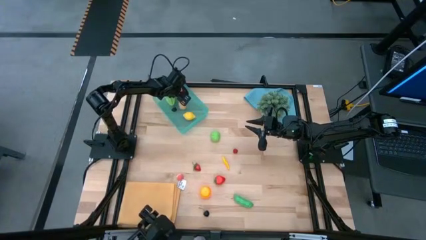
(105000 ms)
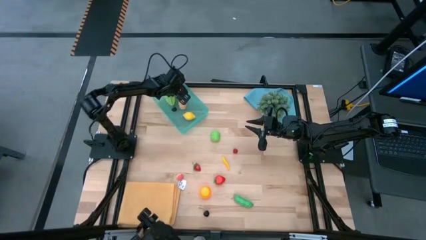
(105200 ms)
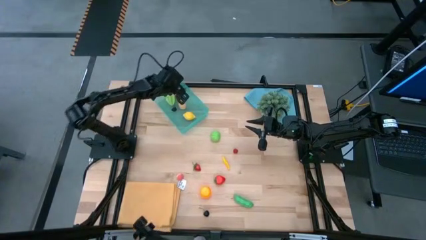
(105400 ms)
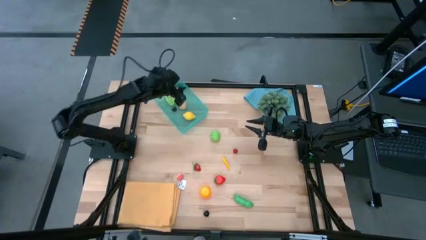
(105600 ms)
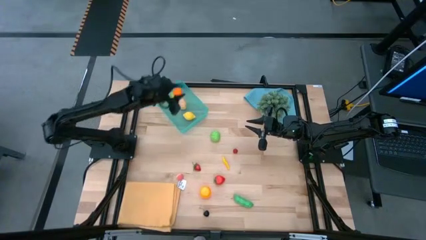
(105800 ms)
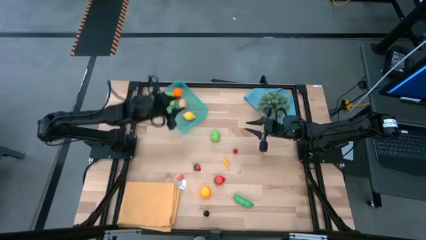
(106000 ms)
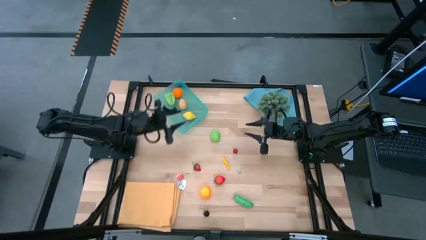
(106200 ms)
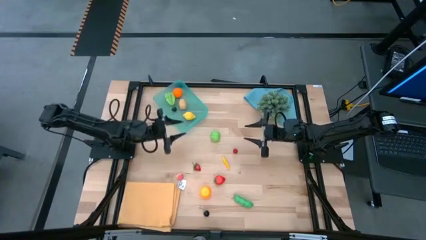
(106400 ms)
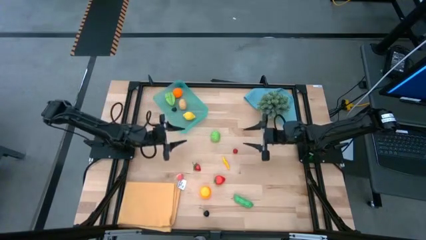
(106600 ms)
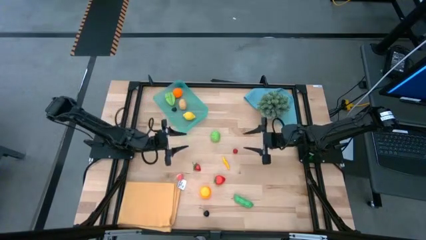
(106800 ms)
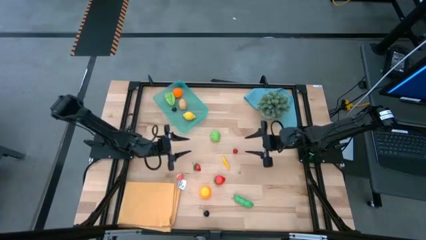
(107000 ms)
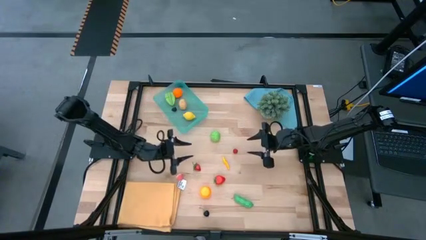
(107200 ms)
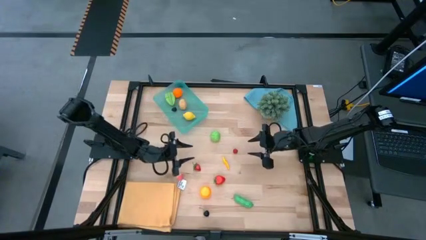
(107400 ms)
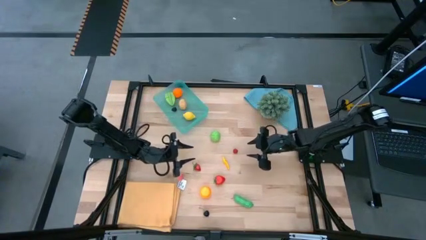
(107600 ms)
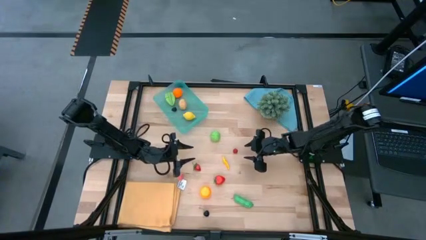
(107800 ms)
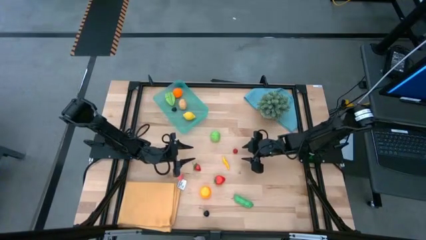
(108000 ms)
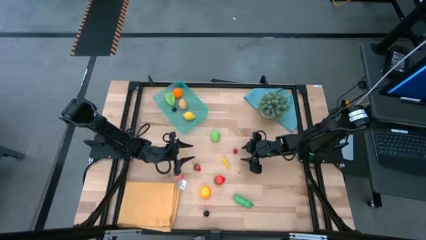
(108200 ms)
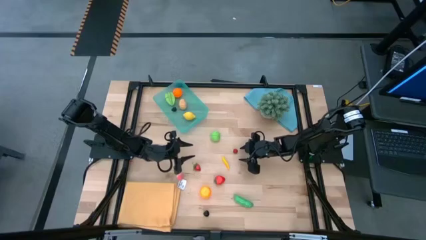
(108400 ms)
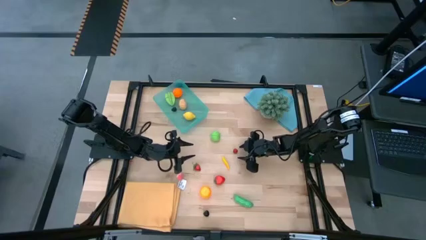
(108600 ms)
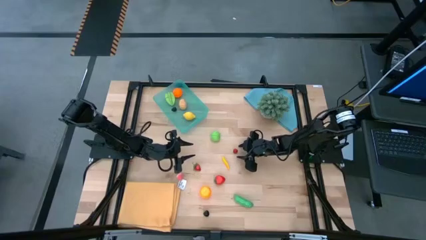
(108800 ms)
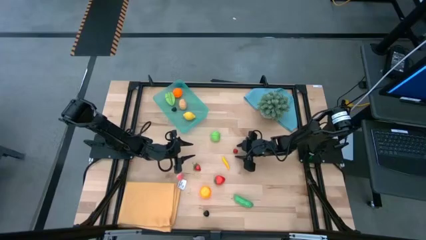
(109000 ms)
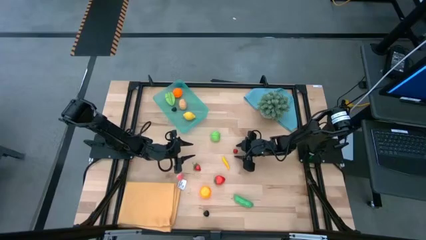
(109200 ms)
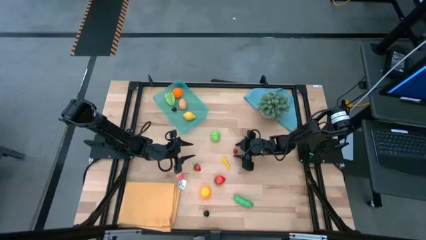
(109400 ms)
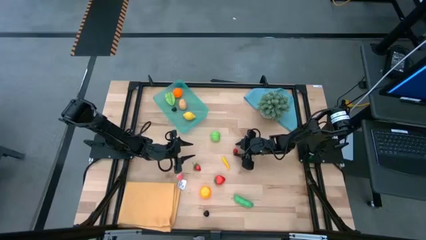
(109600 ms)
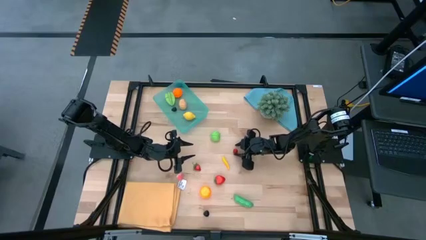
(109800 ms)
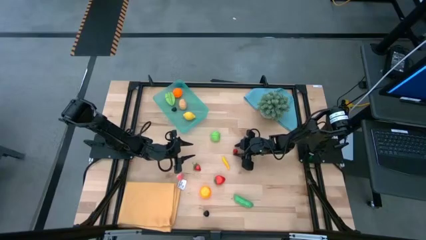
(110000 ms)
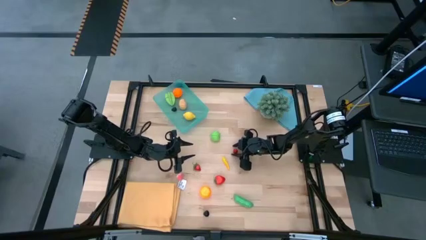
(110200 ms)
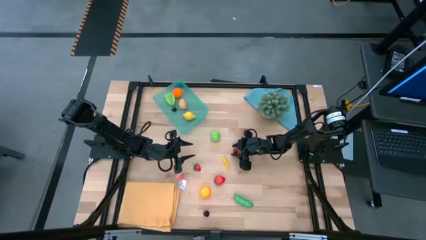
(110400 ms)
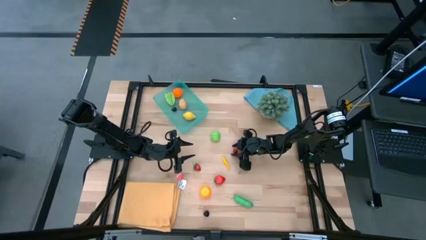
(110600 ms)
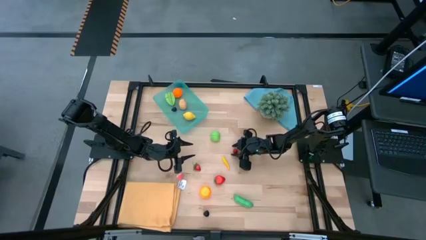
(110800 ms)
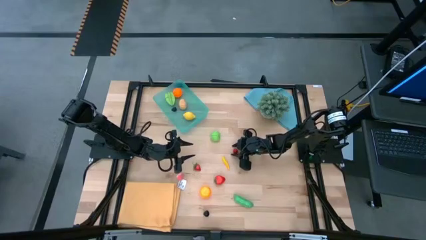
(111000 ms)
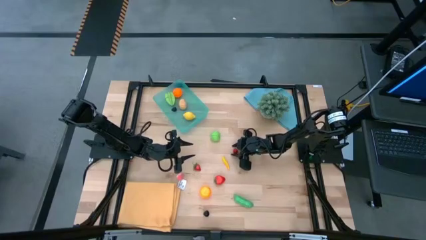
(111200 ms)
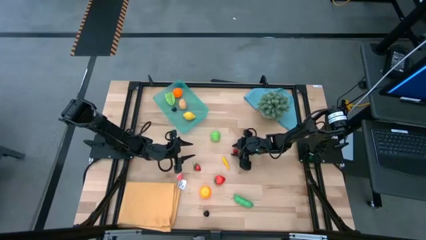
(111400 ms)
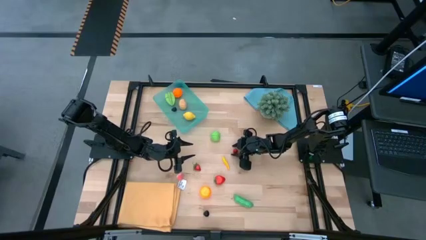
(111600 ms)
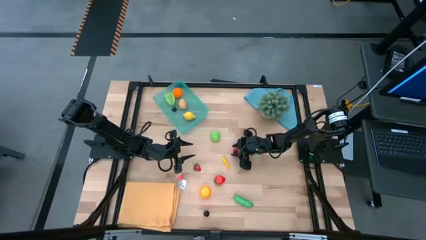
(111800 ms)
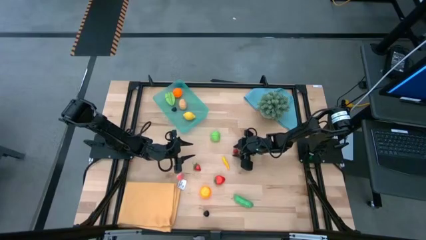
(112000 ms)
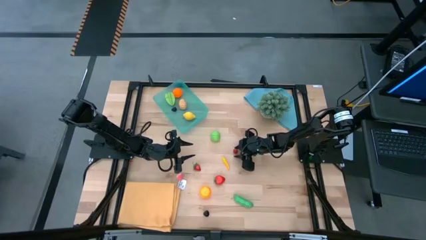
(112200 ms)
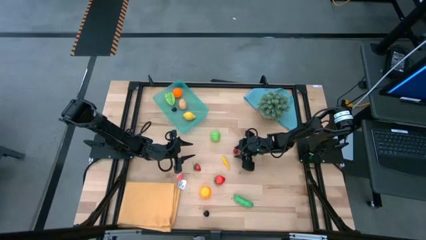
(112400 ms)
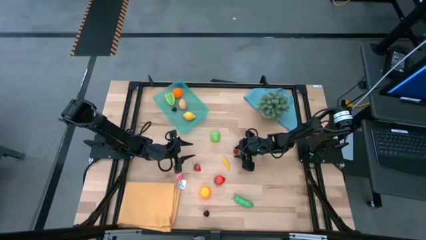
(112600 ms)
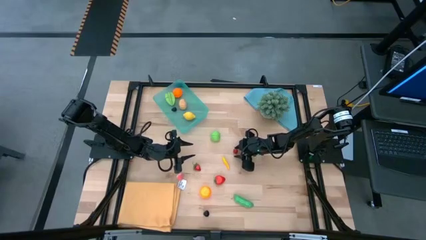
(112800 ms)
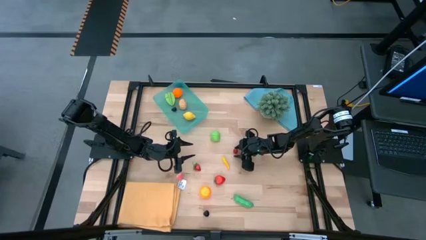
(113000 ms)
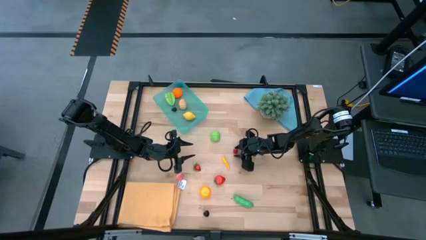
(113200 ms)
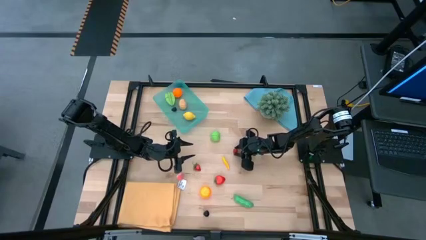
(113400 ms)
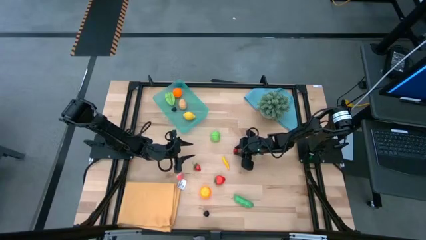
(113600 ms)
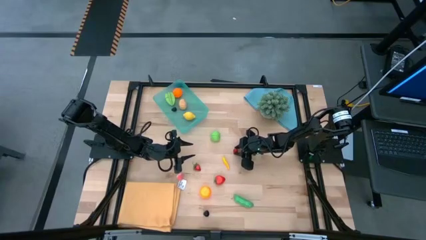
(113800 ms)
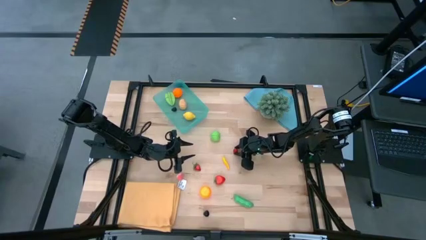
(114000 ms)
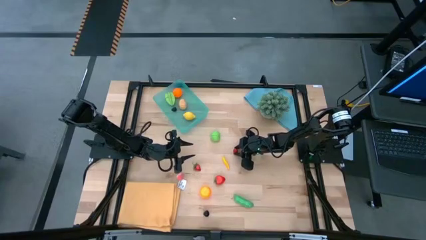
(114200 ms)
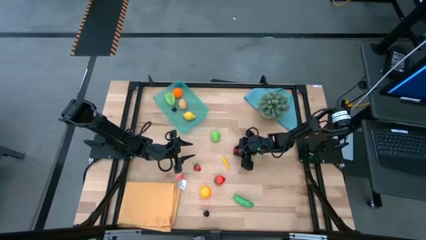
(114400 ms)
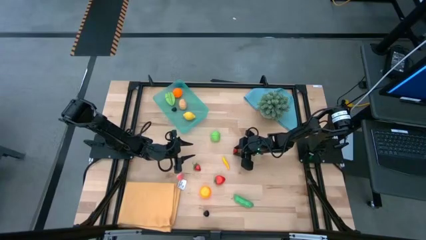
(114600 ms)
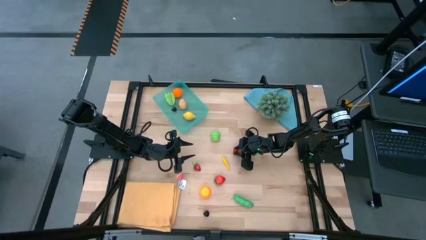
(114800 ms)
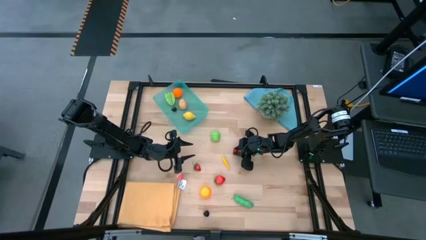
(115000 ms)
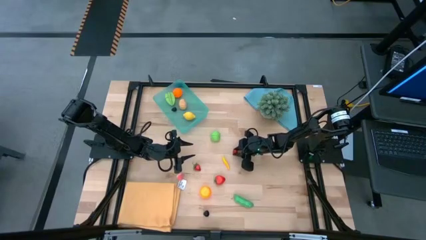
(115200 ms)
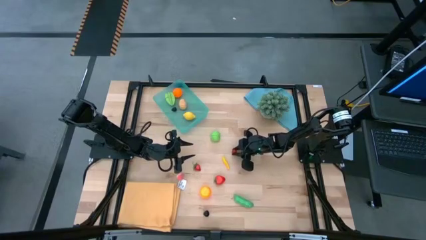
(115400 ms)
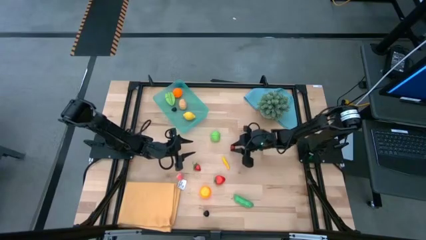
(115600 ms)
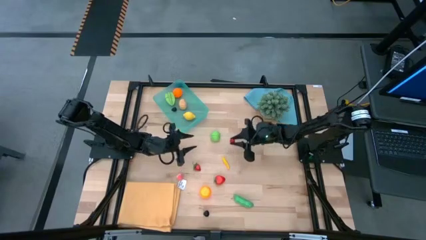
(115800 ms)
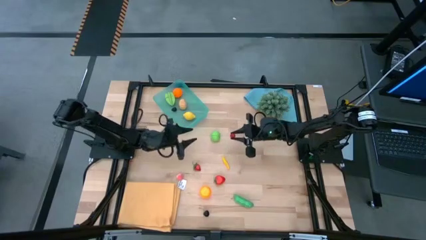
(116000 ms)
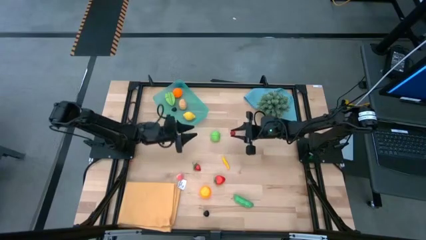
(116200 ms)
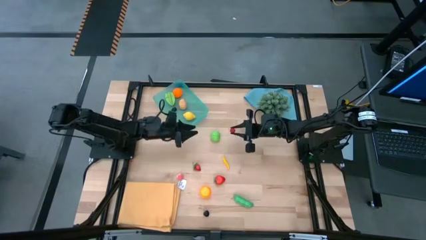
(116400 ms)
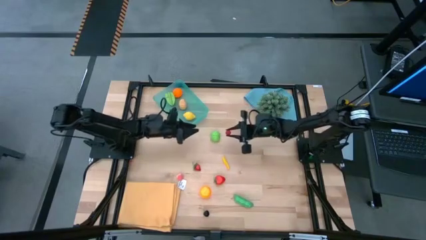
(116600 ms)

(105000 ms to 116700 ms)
Task: Pick and placing Produce into tupperware
Put the red raspberry into the blue bin

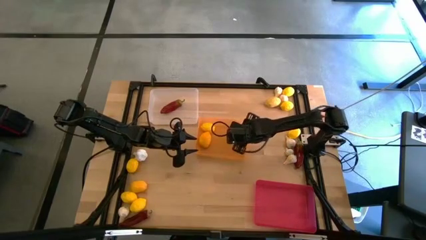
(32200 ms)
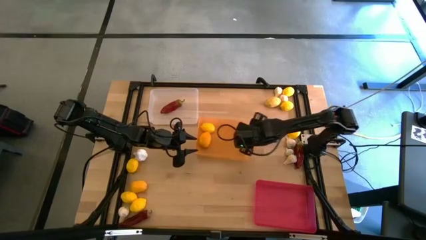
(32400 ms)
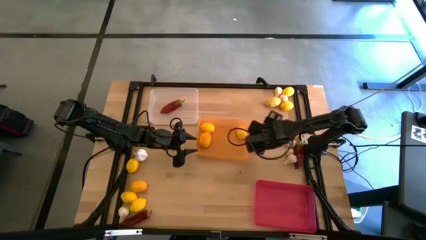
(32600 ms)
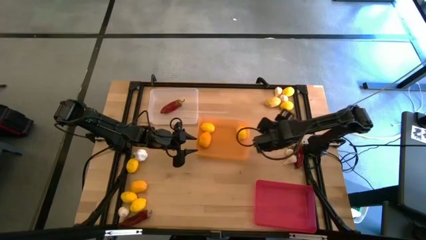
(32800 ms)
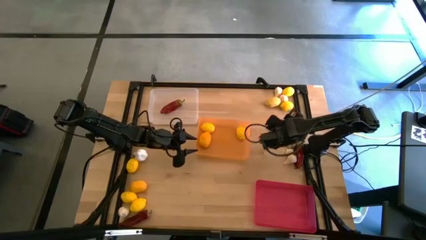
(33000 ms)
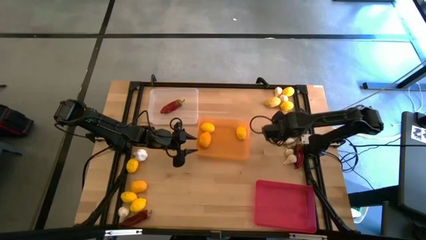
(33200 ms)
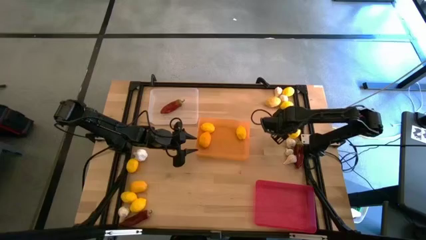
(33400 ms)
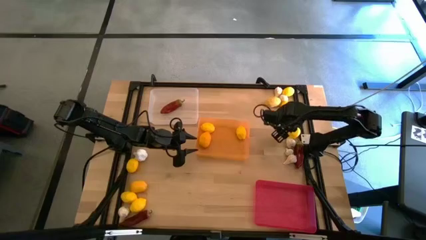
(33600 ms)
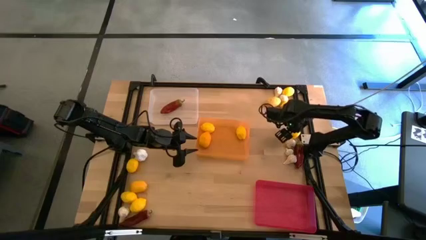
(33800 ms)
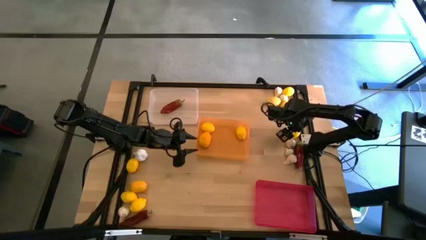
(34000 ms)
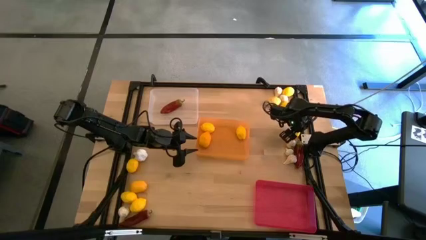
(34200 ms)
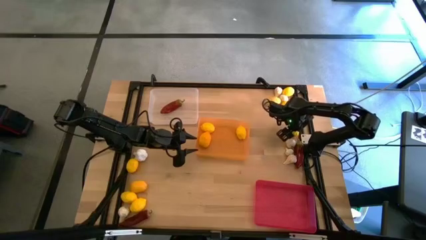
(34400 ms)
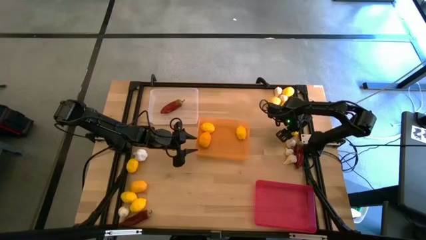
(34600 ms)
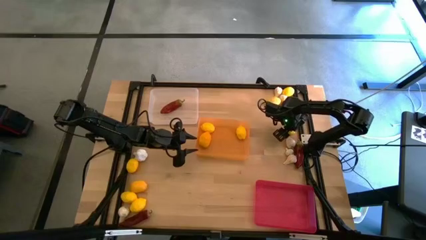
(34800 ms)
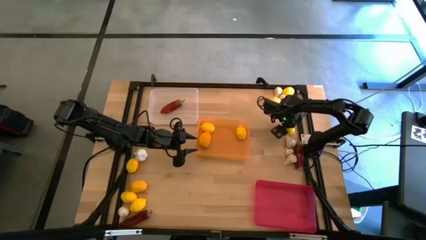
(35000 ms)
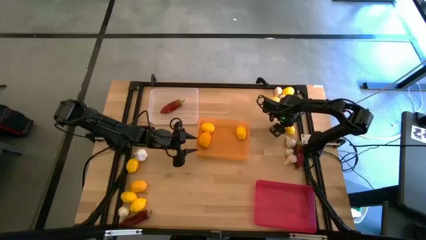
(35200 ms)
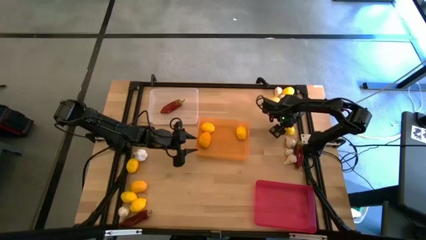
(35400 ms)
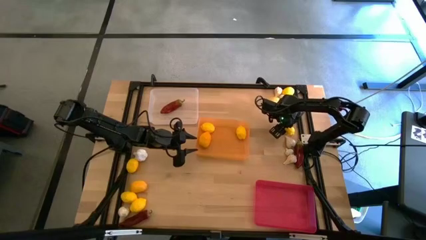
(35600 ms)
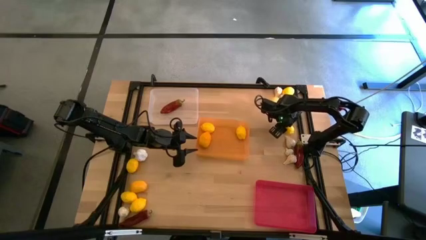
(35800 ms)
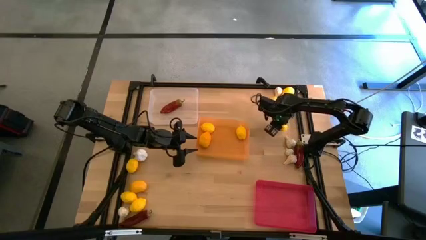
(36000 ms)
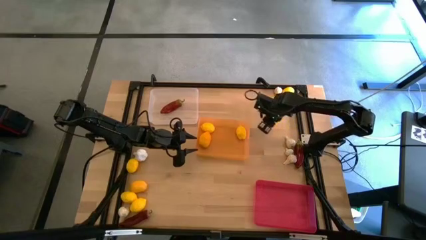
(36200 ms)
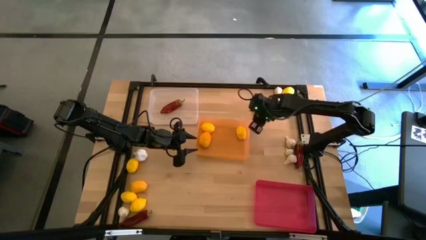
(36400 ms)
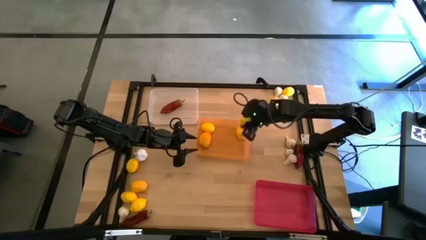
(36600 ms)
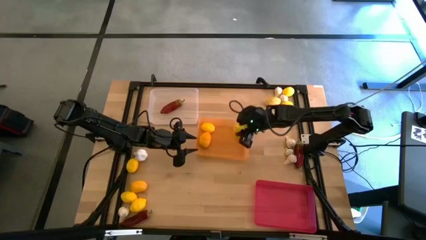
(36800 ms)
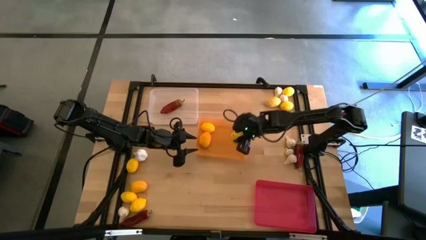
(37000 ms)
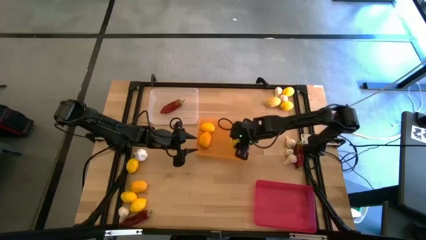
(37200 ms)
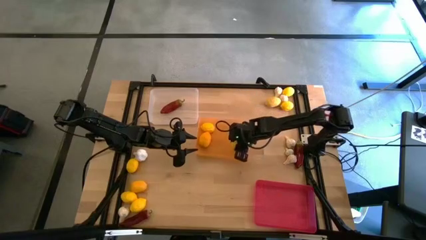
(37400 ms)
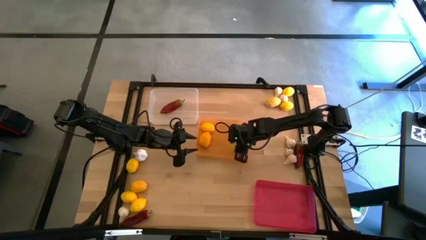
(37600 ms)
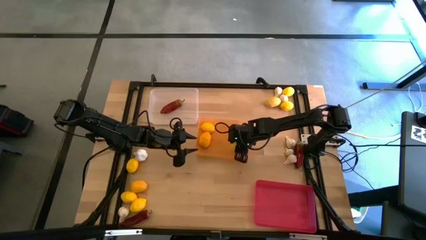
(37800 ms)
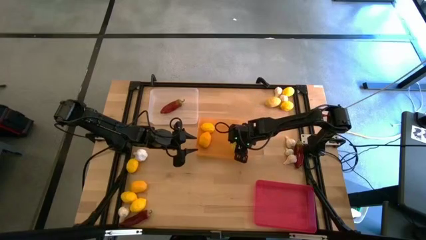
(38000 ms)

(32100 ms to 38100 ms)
Task: Sort produce into baskets
Put the lemon into the orange bin
